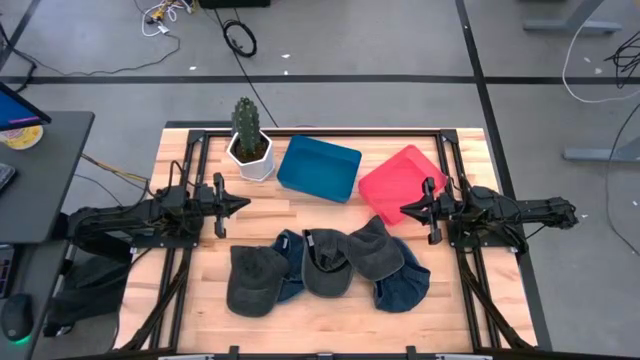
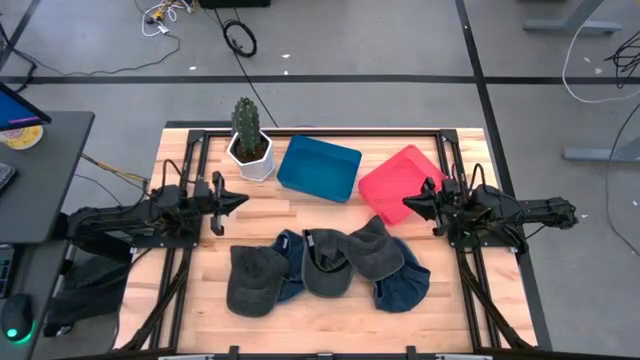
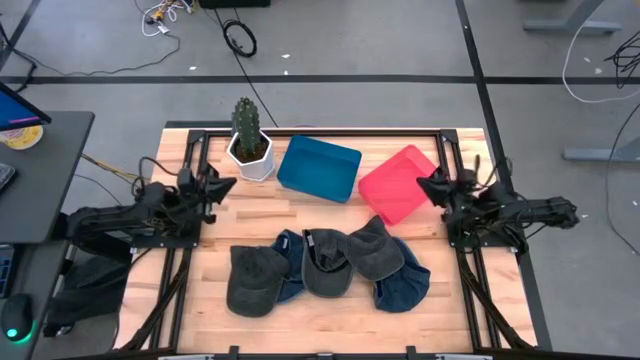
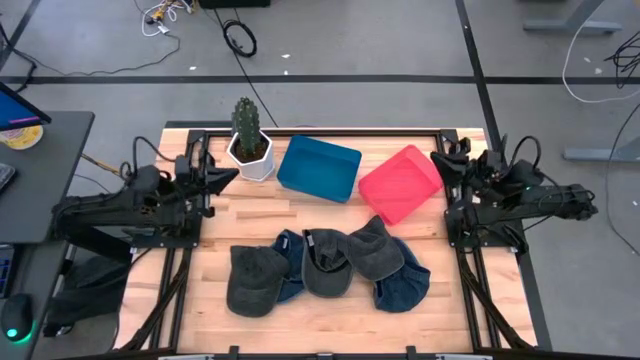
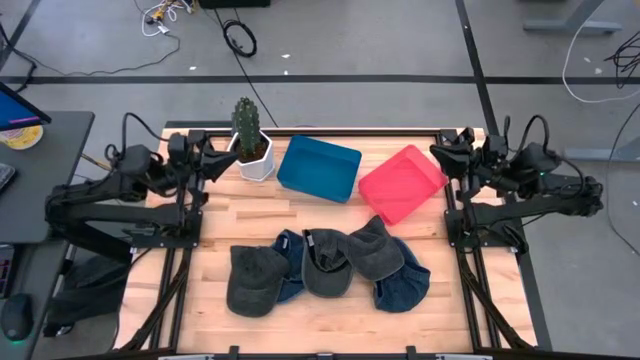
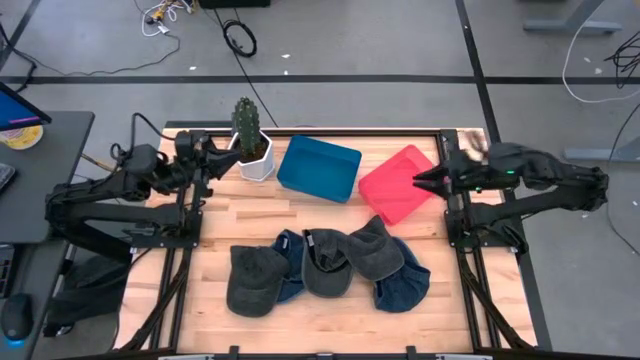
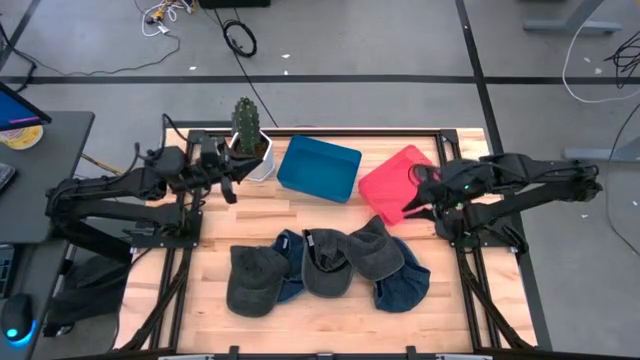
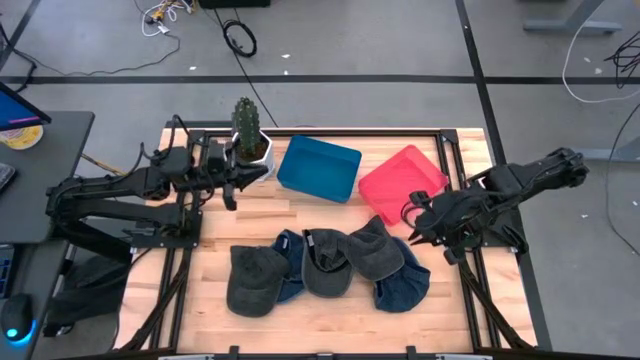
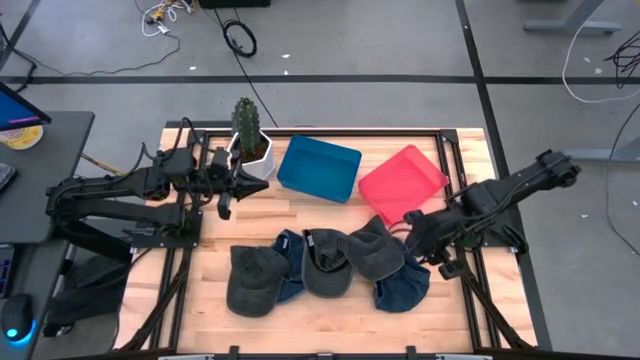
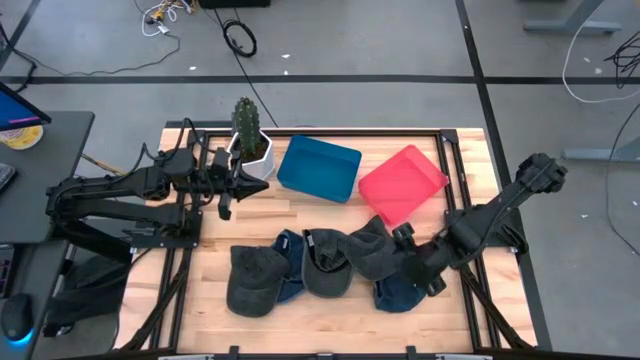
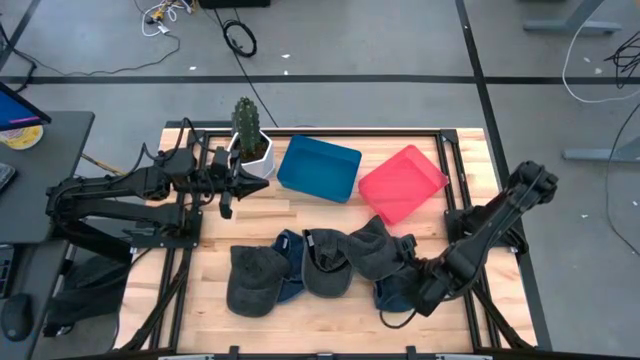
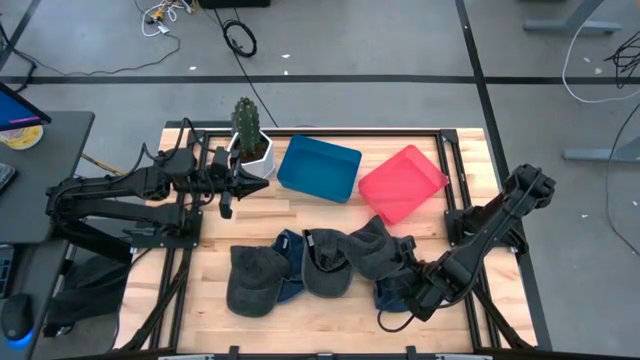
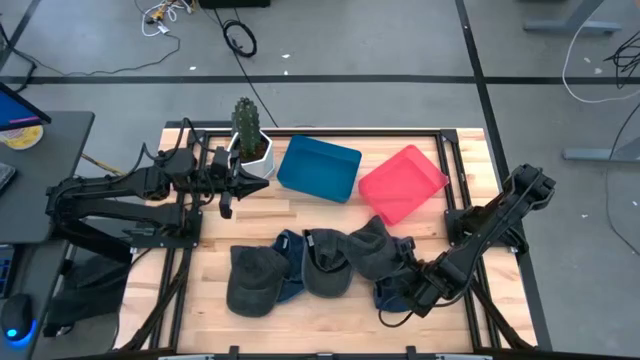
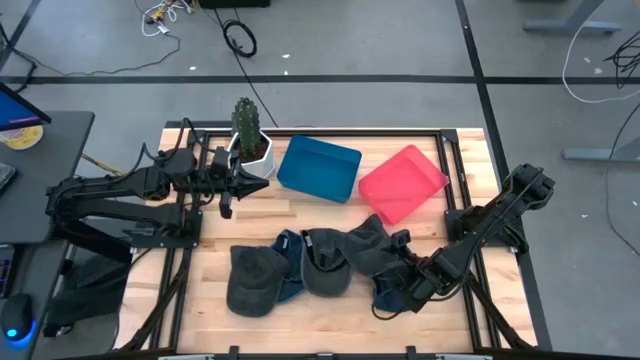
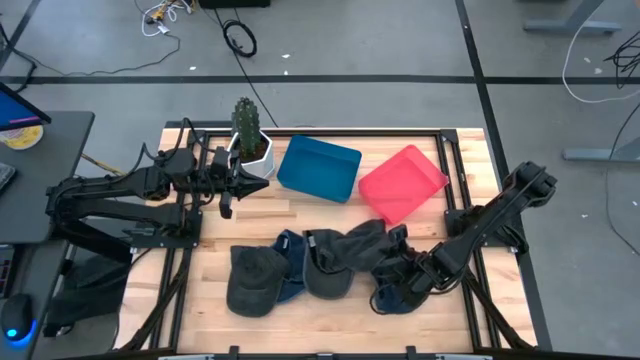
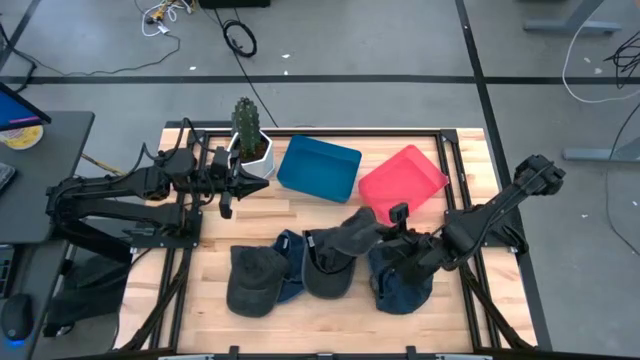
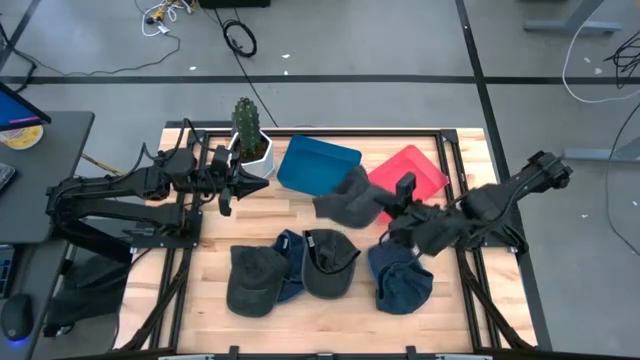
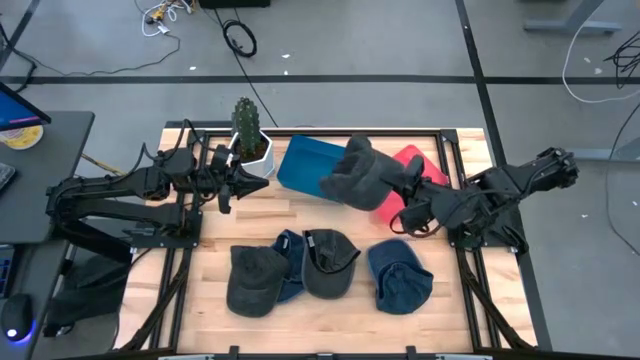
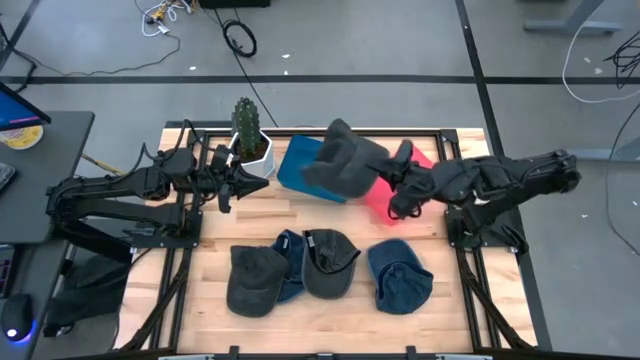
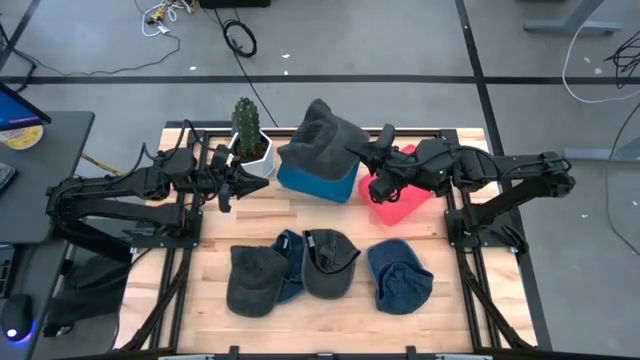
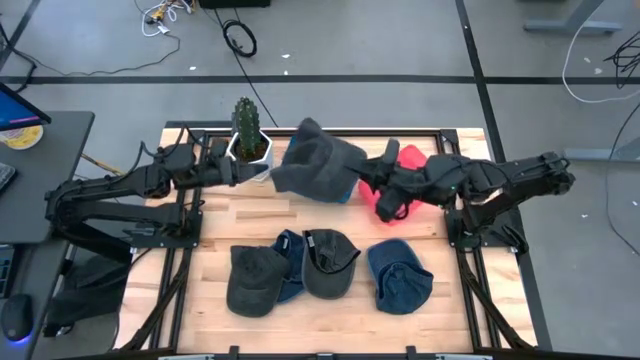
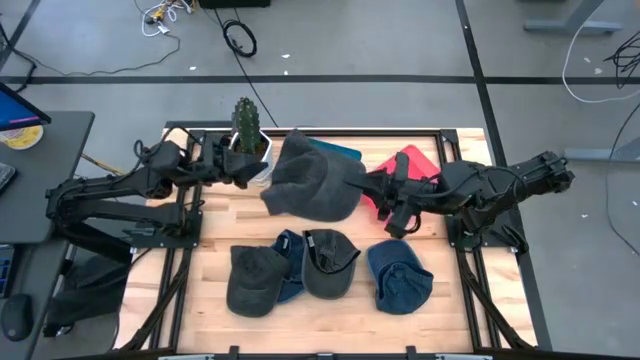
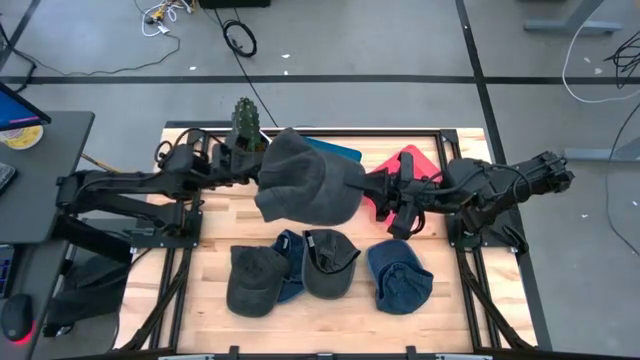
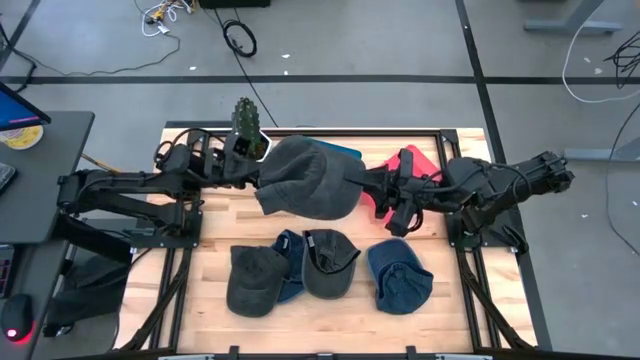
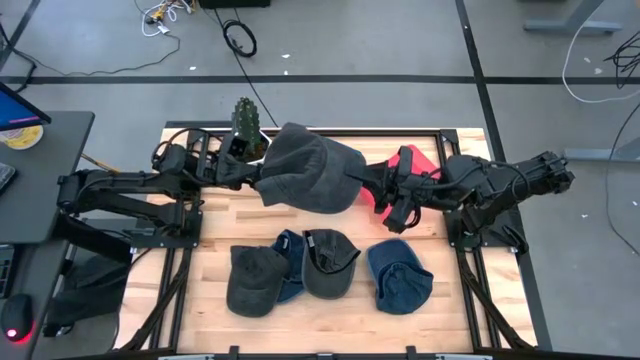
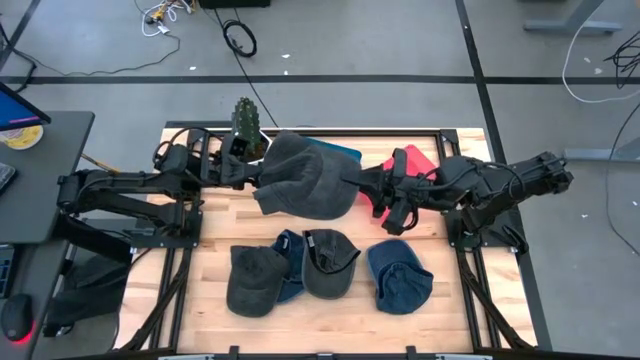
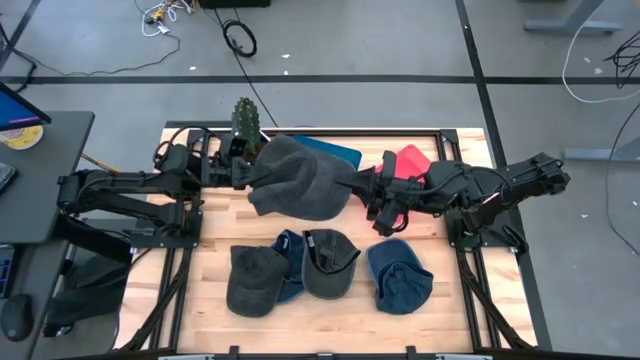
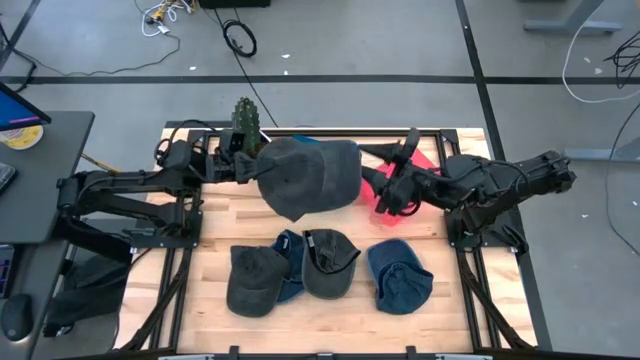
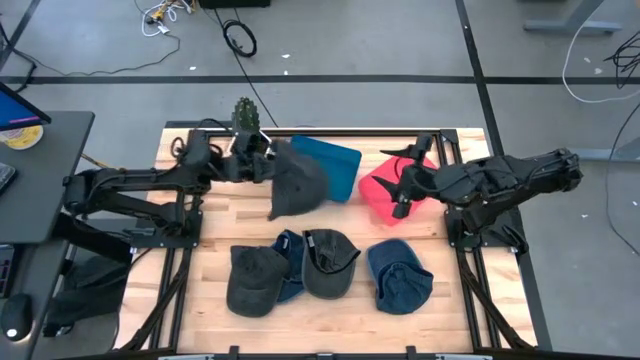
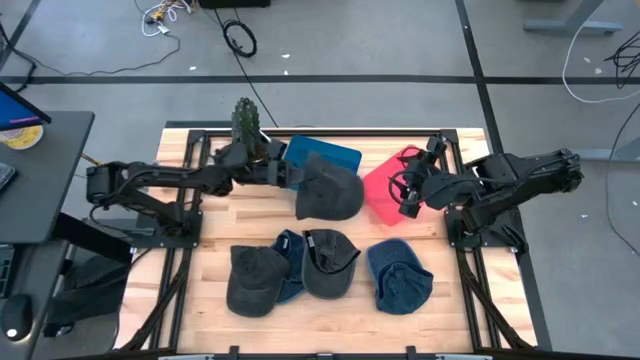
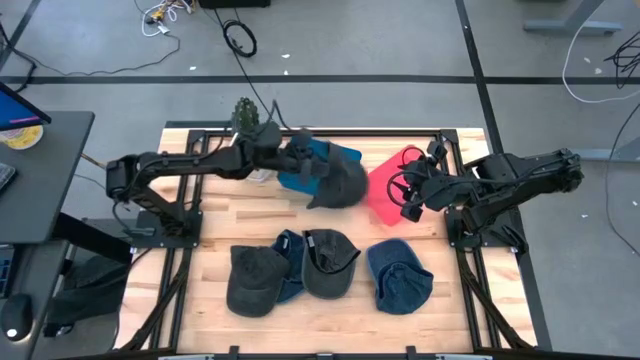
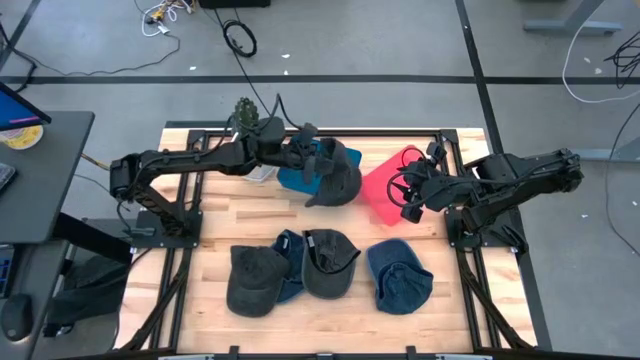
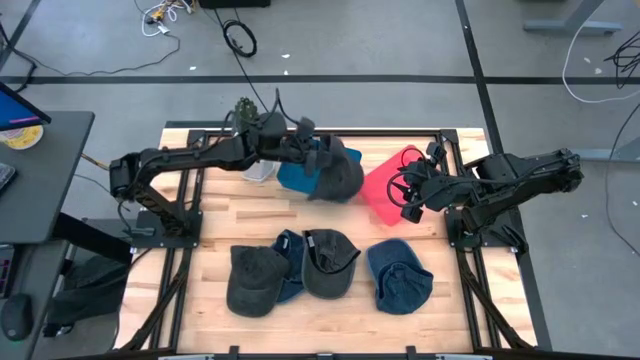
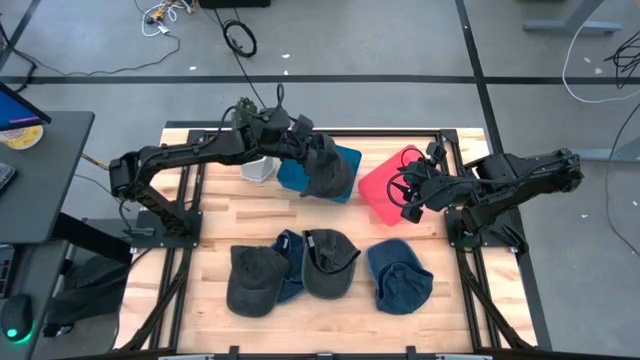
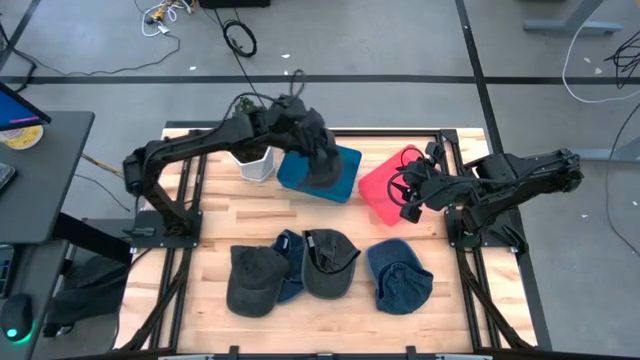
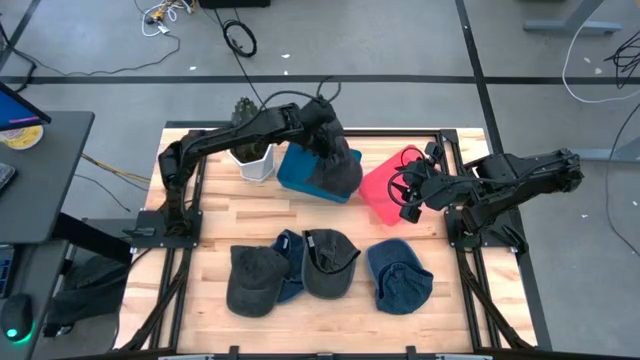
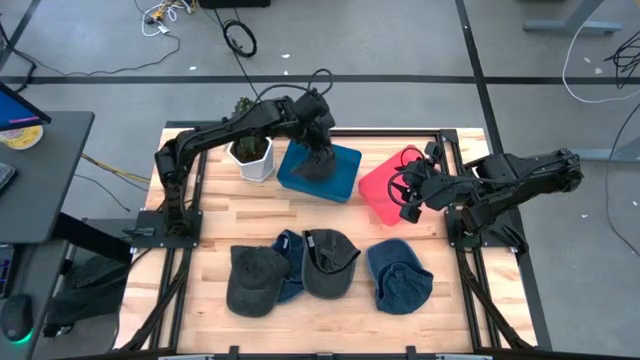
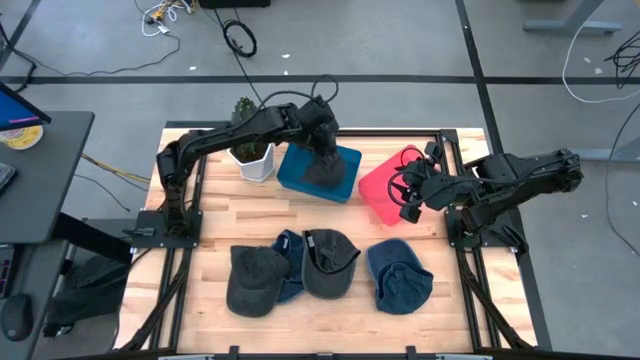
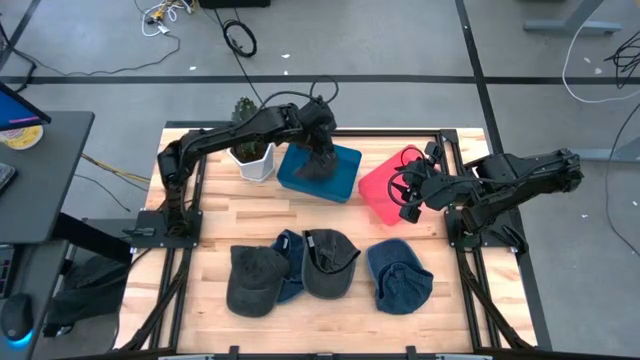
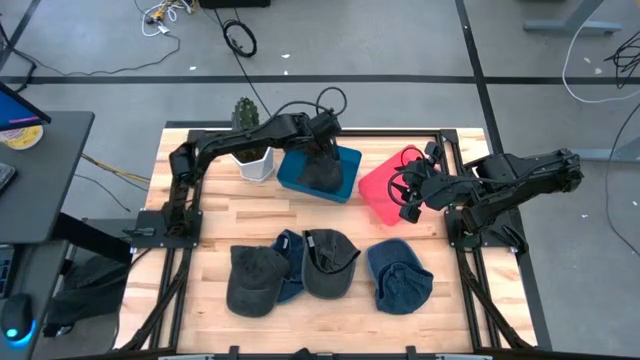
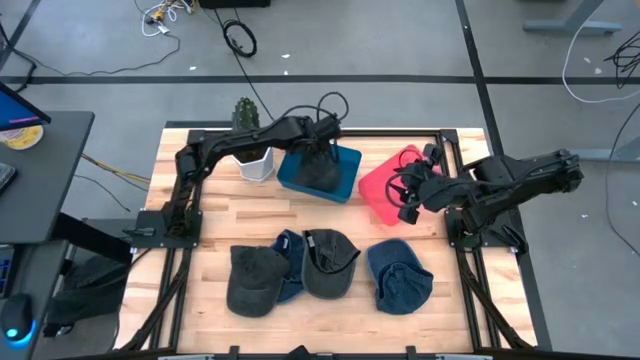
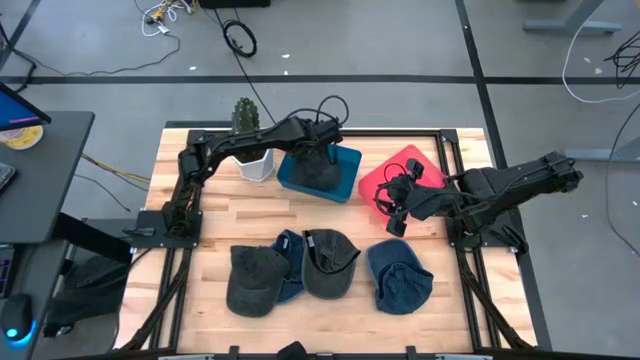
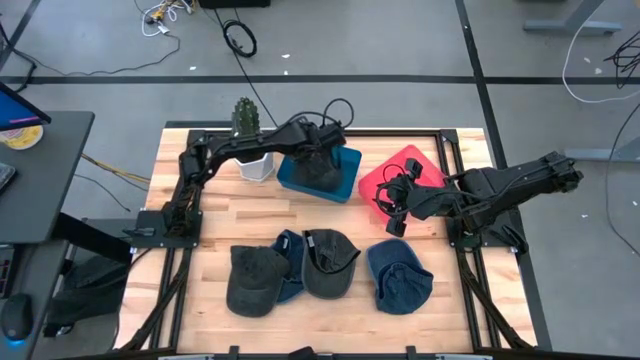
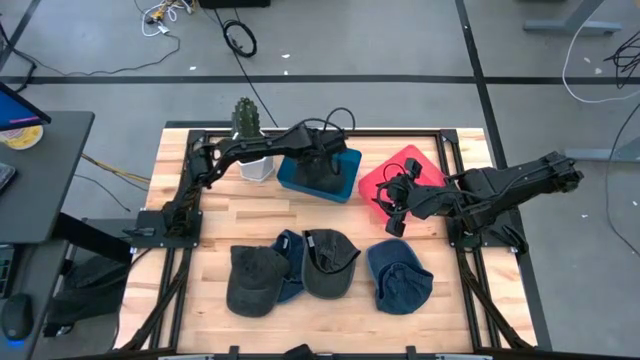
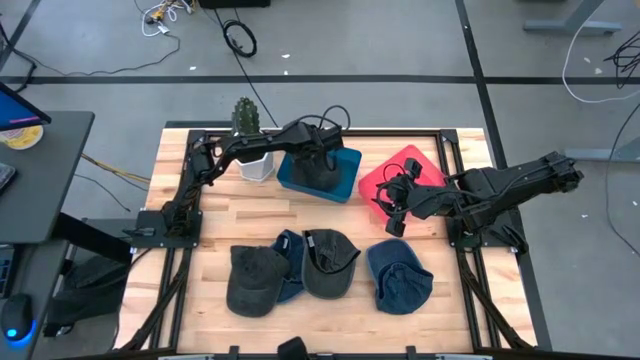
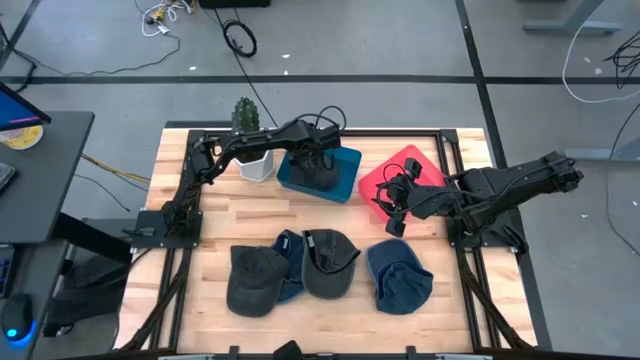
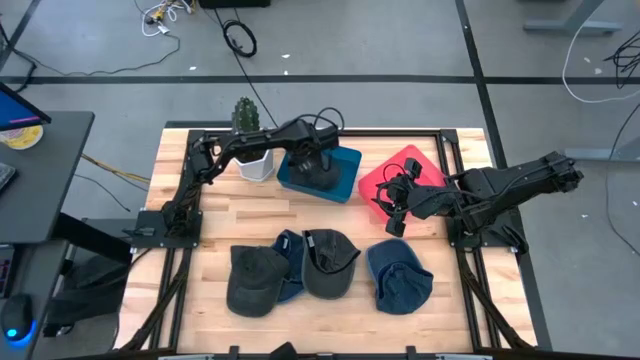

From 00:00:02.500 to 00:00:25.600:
Task: Pick & Place hat
Put the right black cap into the blue bin
